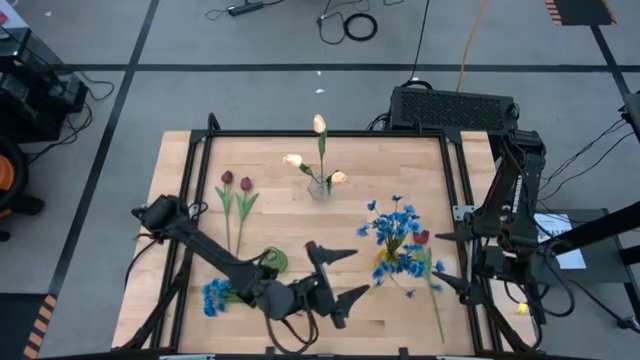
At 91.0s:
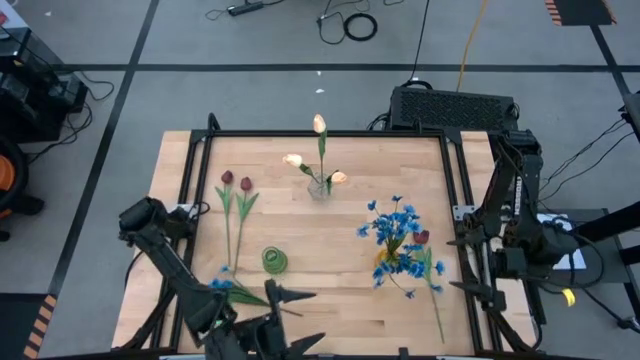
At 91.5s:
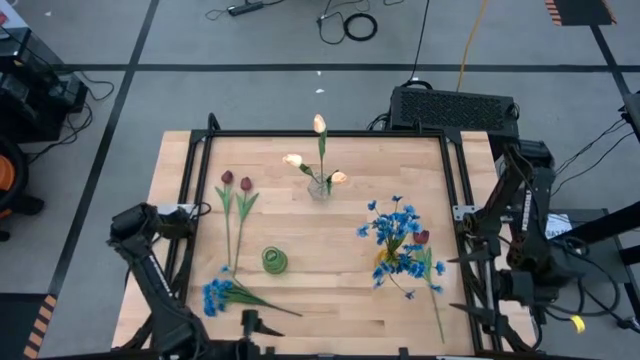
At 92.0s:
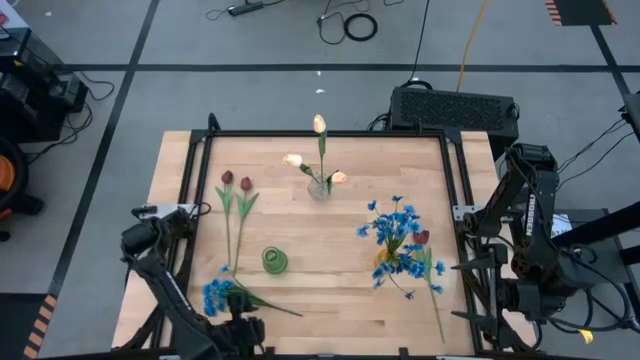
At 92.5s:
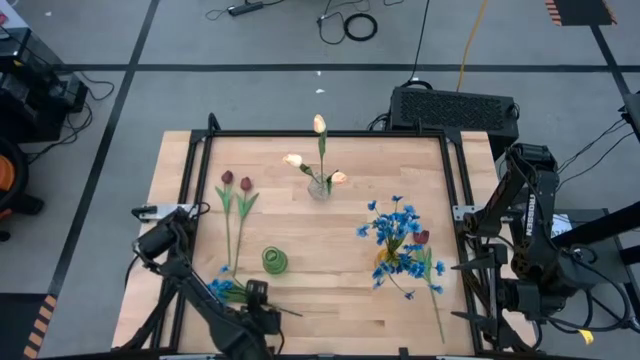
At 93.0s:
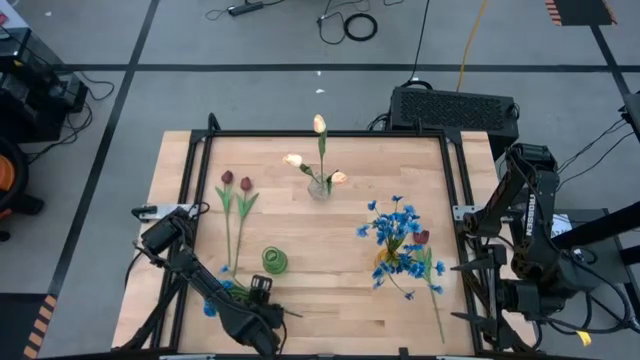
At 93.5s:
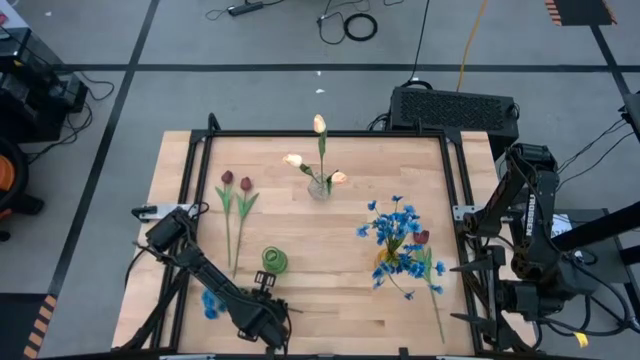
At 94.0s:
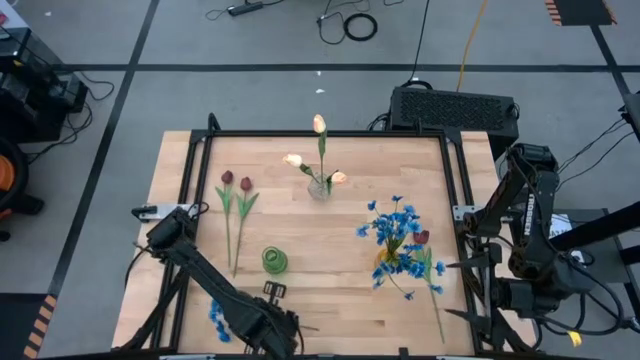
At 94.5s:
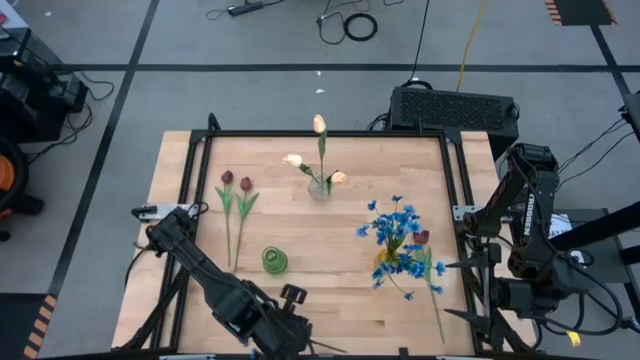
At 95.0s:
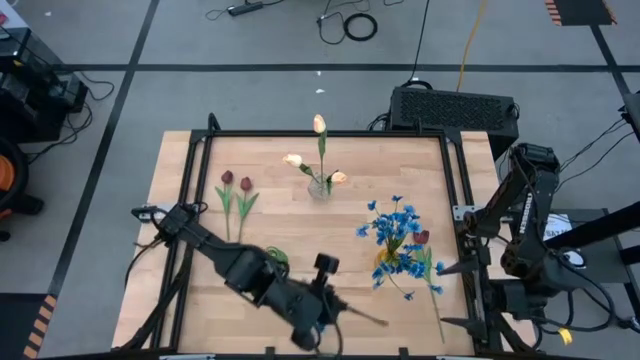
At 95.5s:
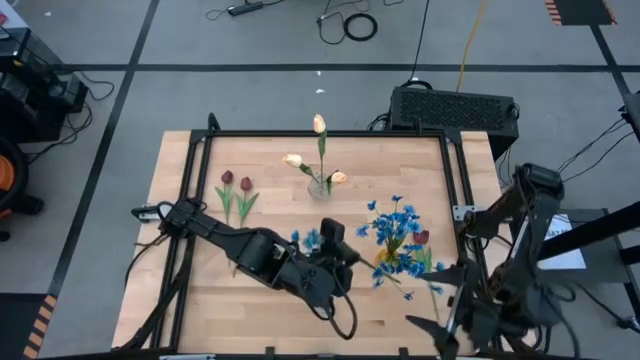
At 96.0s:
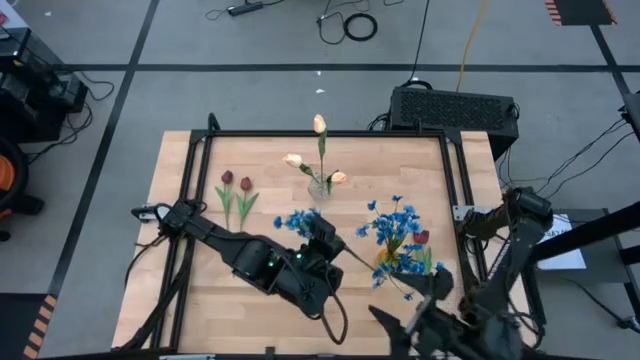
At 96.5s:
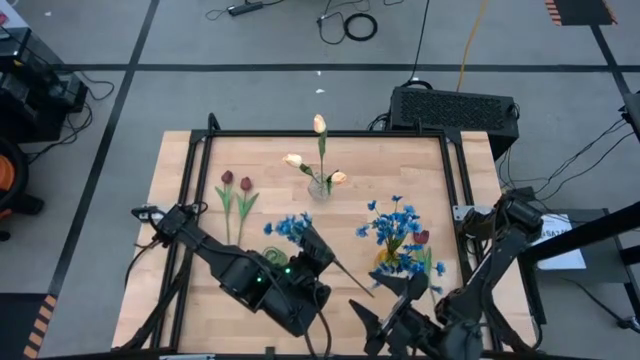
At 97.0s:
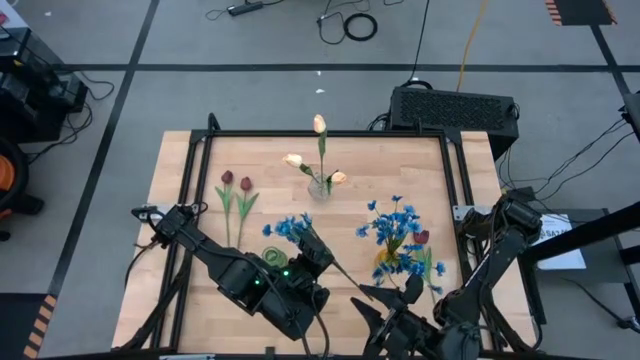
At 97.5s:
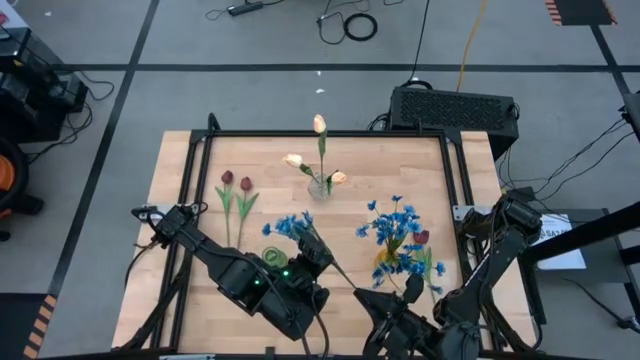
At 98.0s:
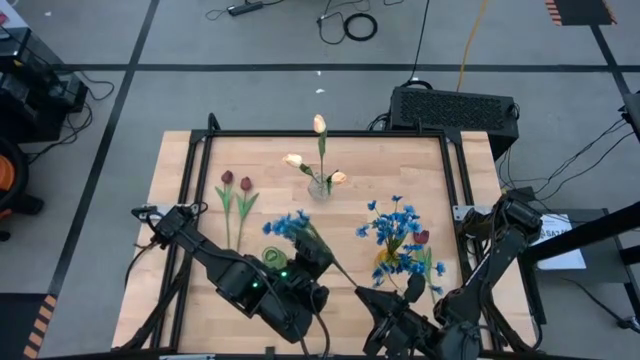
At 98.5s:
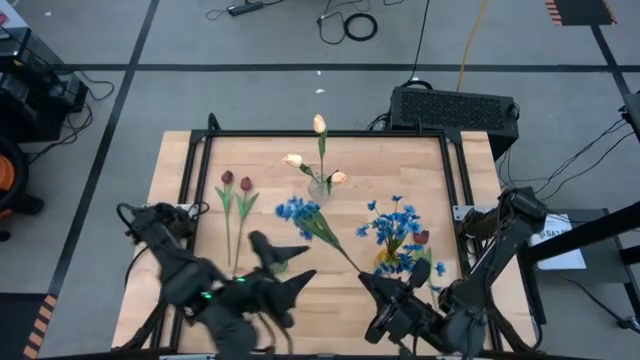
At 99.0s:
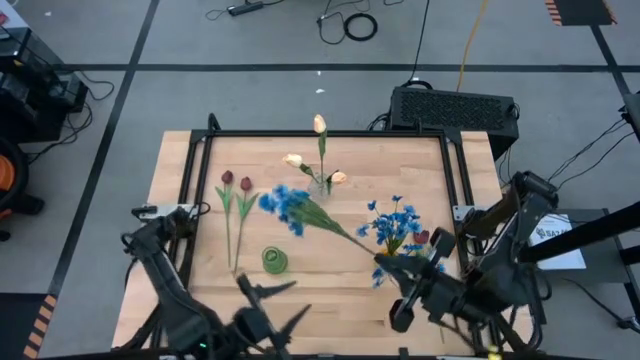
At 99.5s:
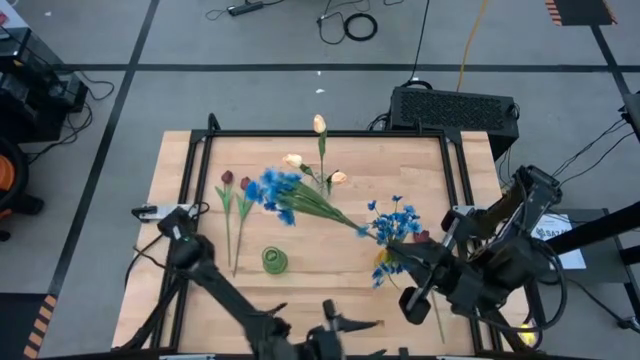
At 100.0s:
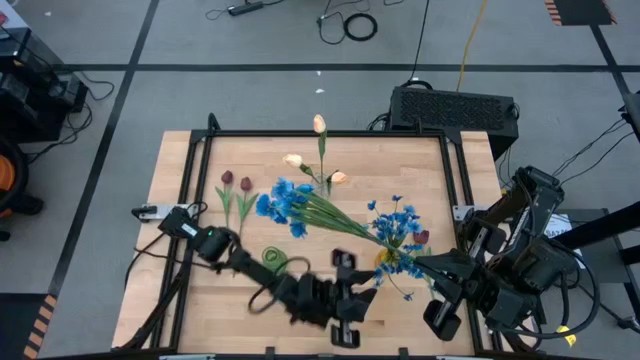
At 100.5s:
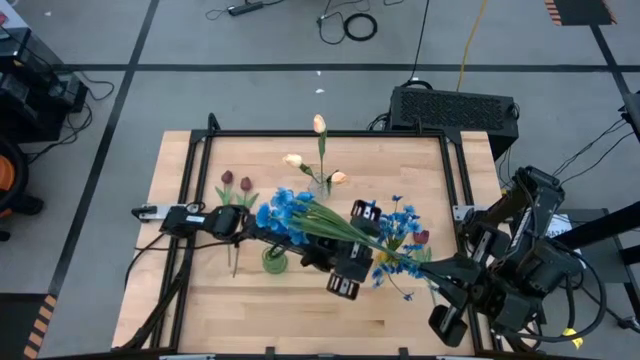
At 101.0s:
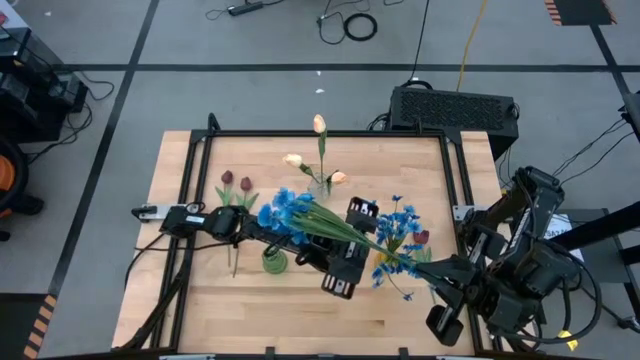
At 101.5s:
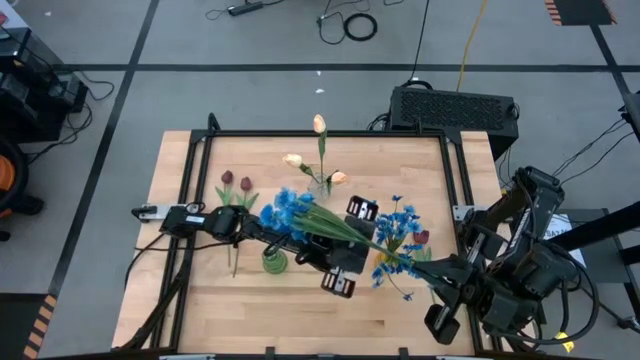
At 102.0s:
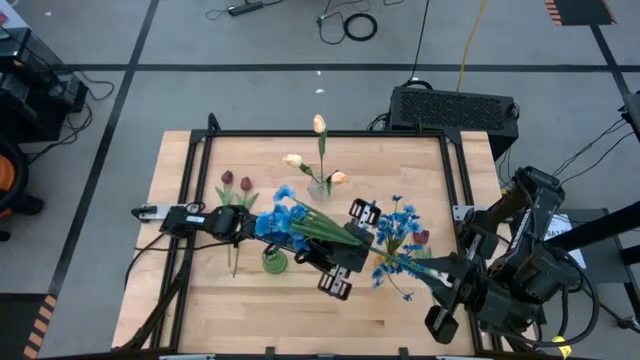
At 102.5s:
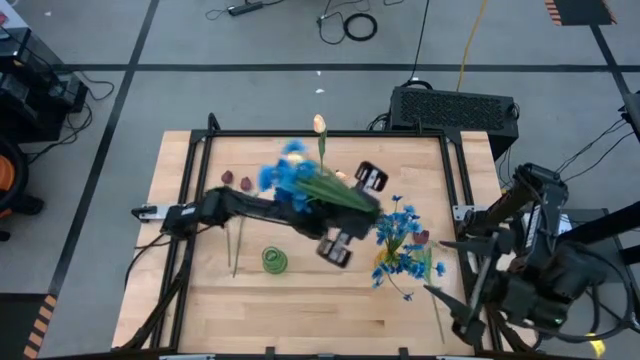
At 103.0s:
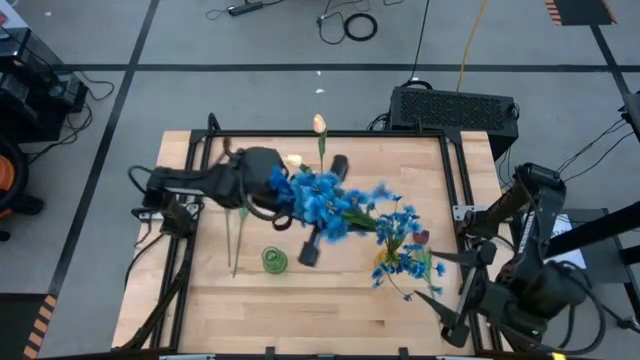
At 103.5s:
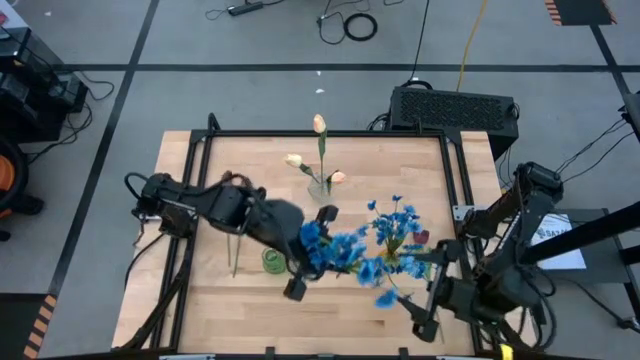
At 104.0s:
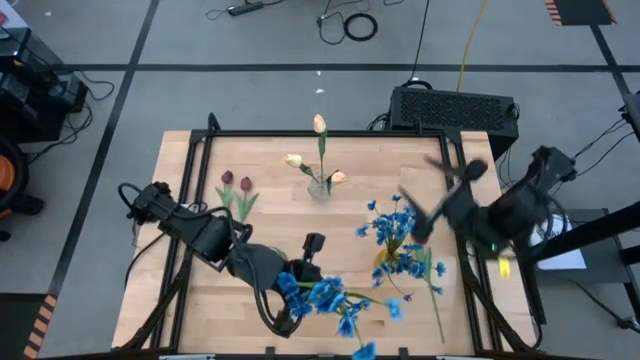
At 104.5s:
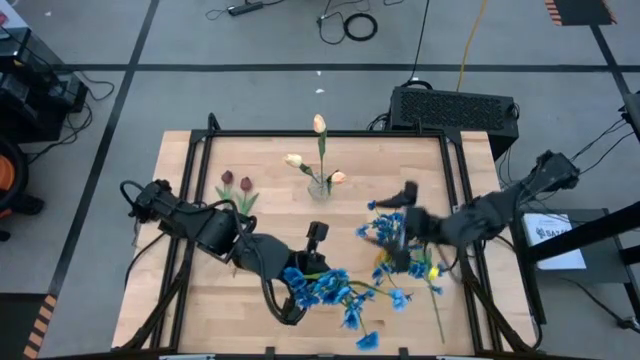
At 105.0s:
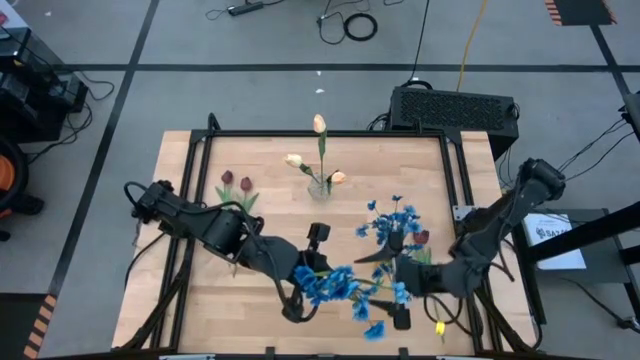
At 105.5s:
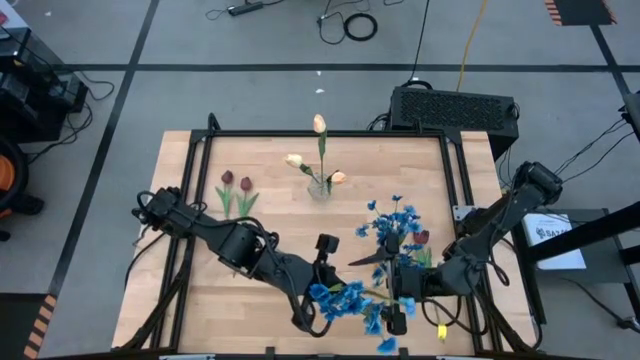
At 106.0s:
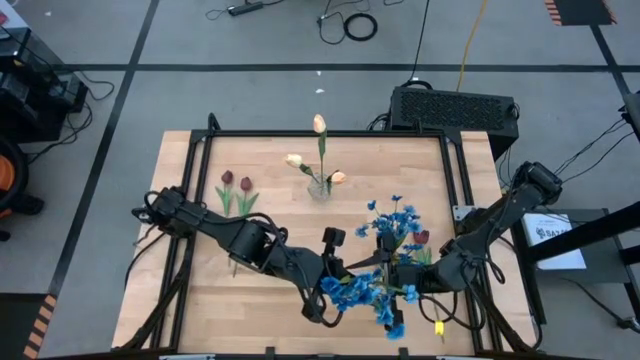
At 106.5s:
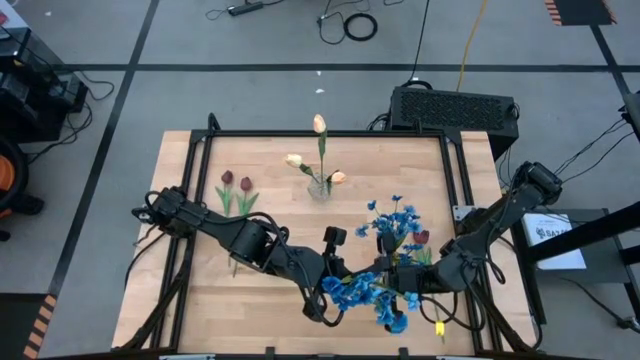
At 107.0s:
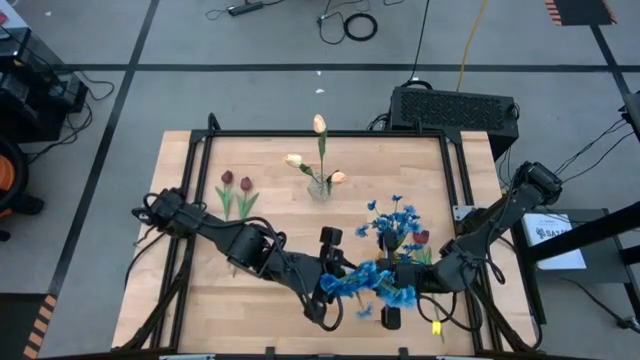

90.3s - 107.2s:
Task: Sort flowers into vase by color
Put the blue flowers into the yellow vase

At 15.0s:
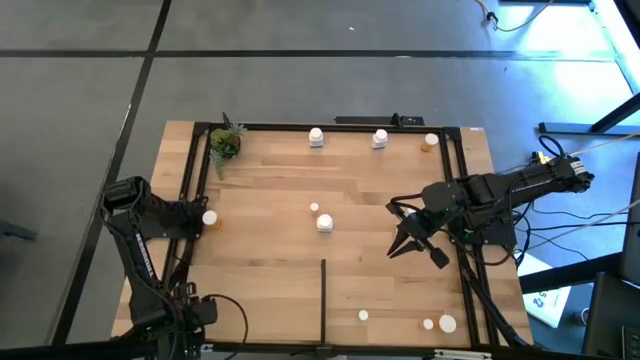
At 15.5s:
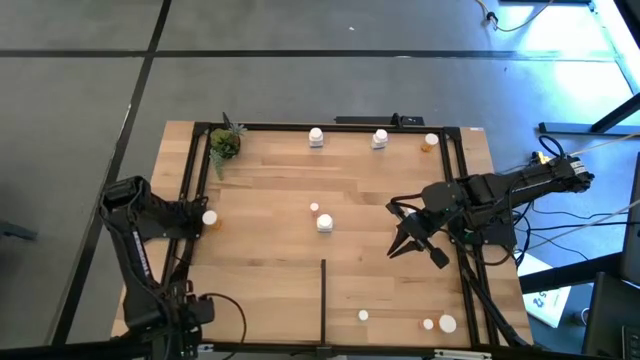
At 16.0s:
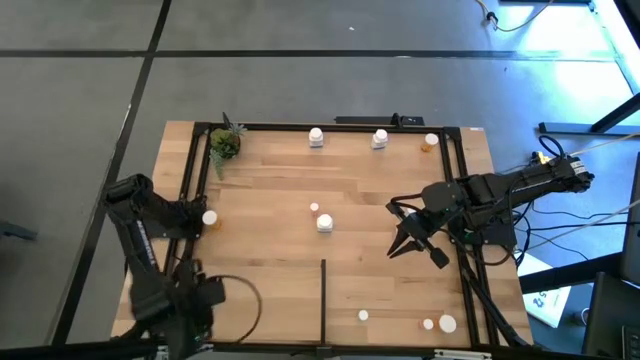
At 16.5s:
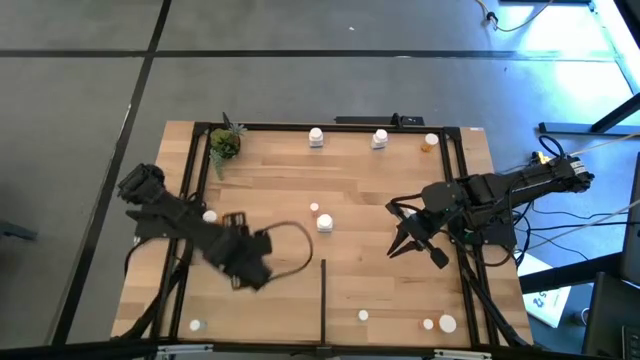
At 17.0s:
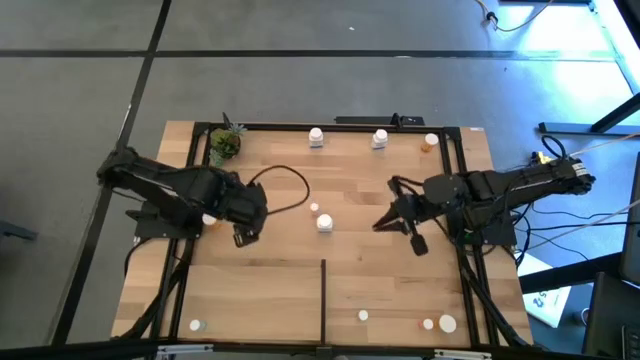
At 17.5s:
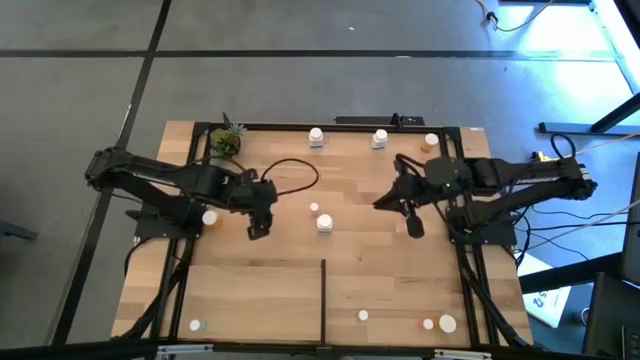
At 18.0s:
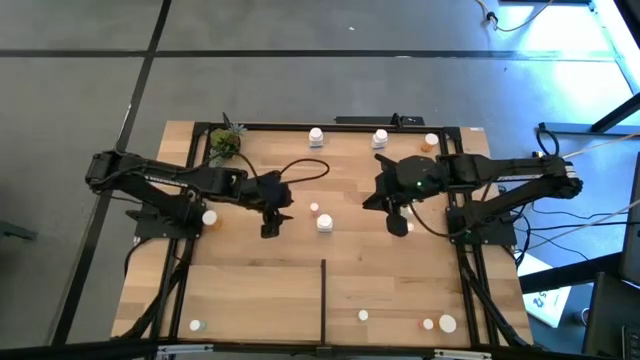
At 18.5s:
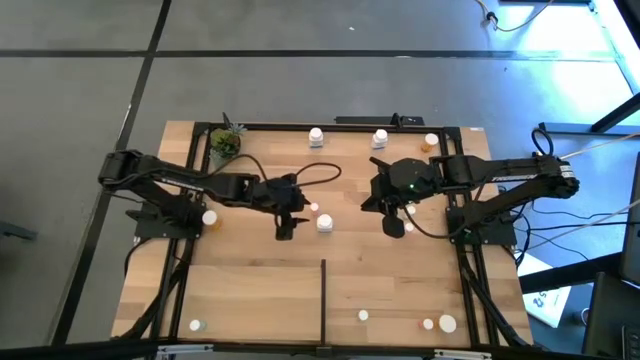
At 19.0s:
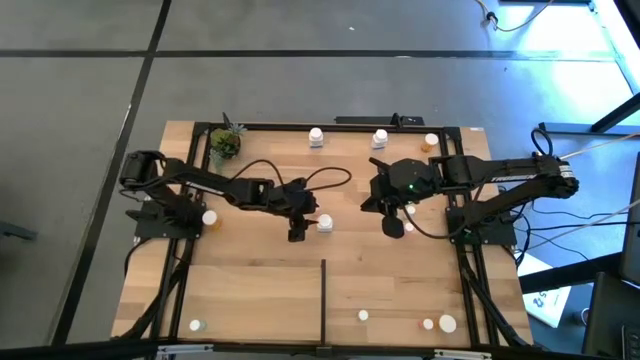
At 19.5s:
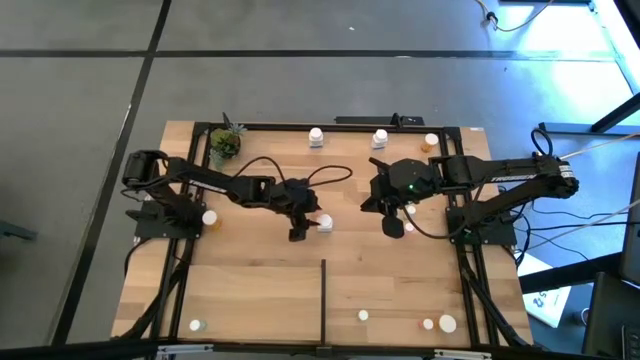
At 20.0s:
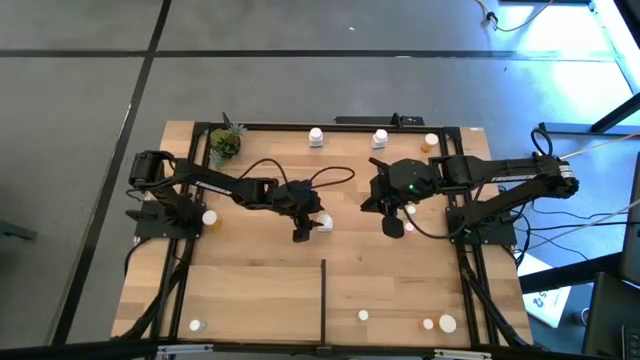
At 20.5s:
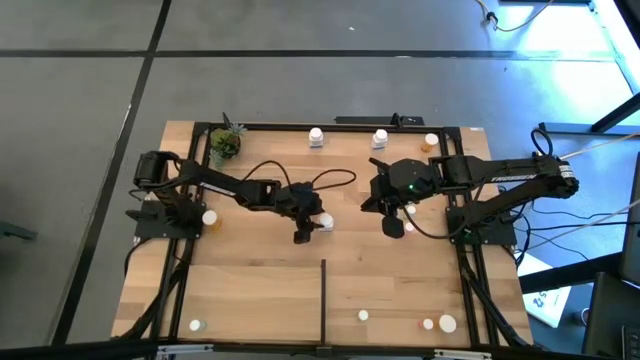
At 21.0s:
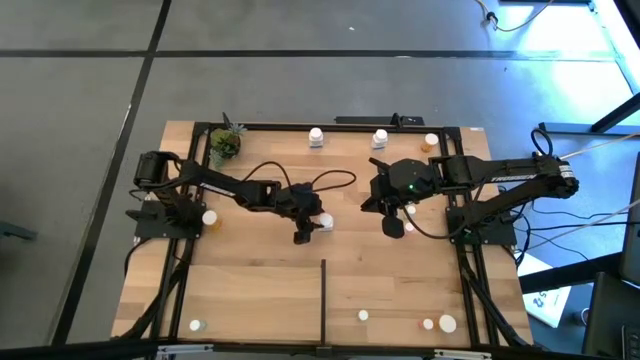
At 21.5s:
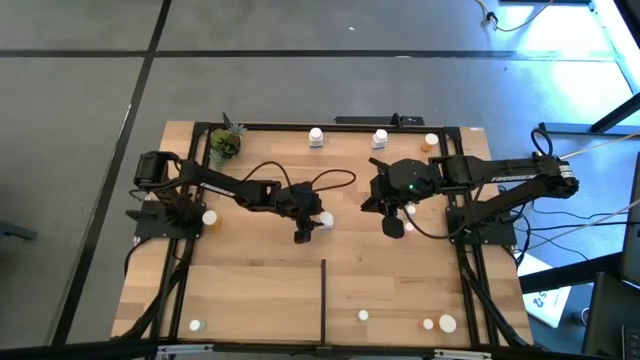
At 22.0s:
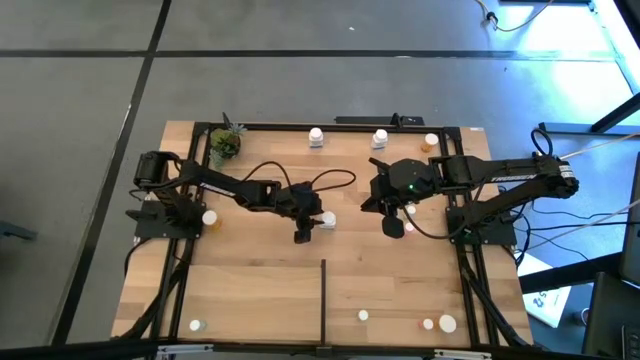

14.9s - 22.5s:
Task: Pick and place medicine bottles onto shelf by color
Put the bottom white pill bottle on the shelf
